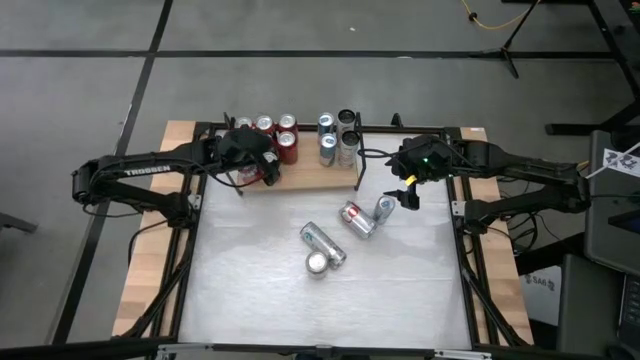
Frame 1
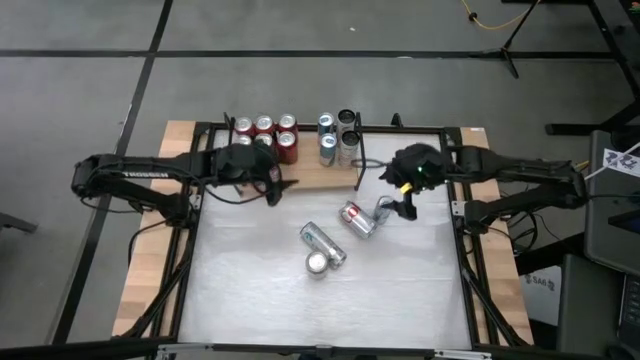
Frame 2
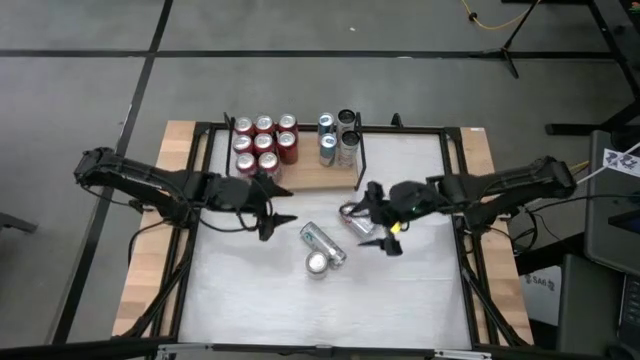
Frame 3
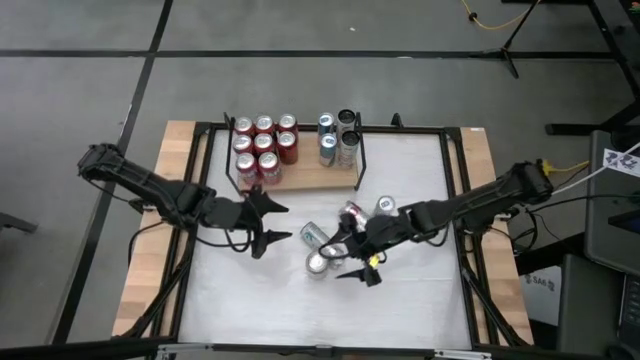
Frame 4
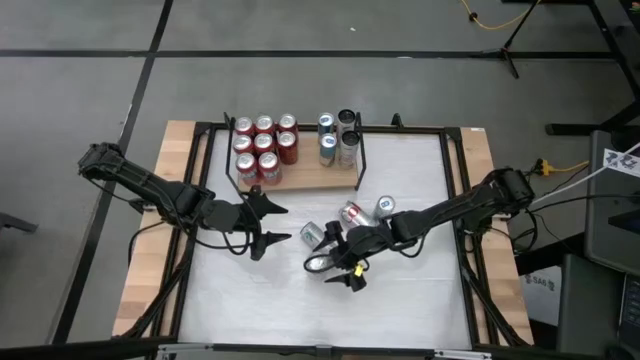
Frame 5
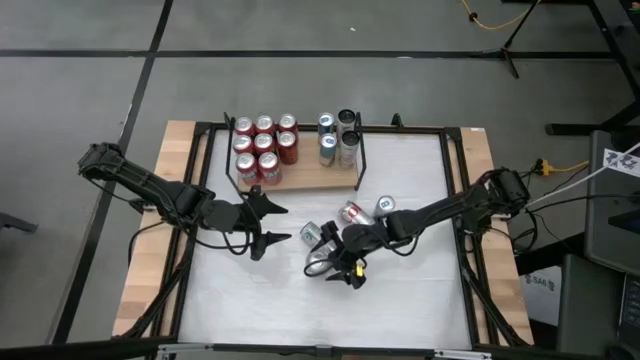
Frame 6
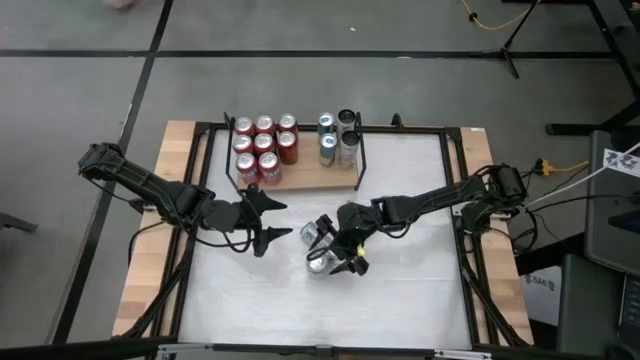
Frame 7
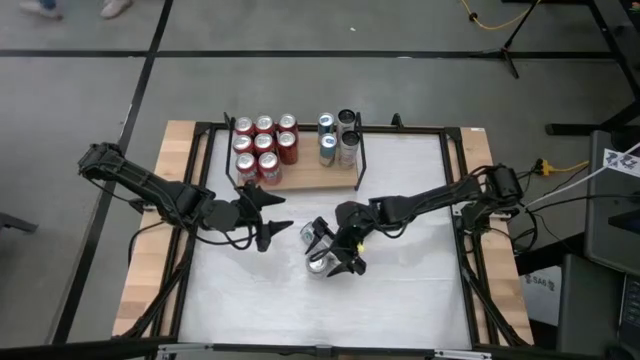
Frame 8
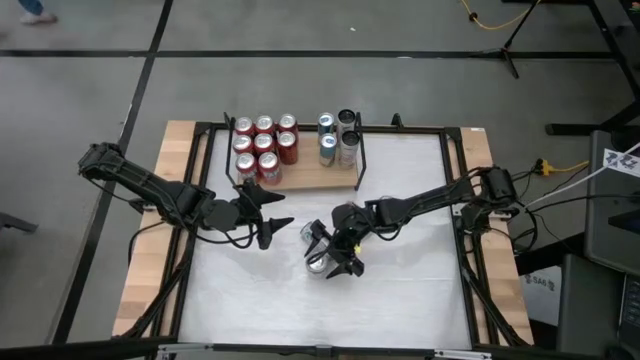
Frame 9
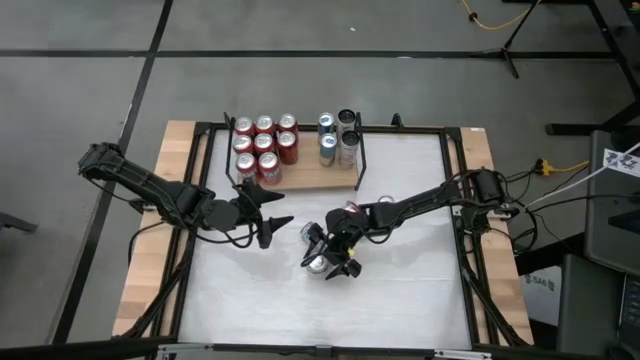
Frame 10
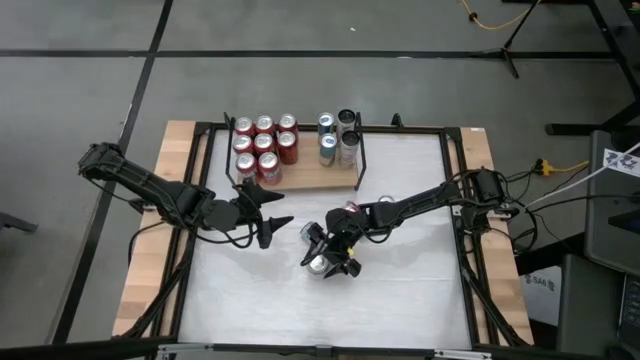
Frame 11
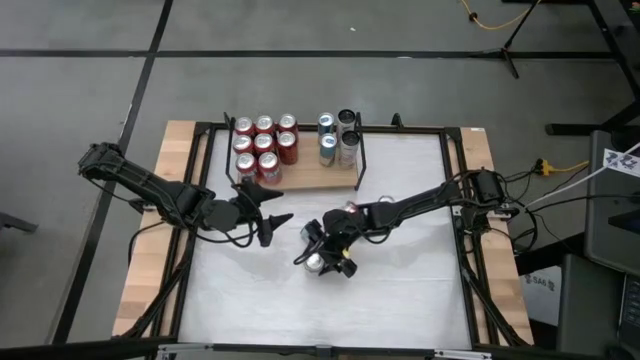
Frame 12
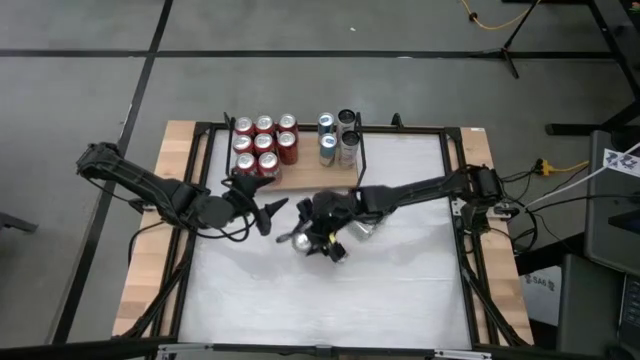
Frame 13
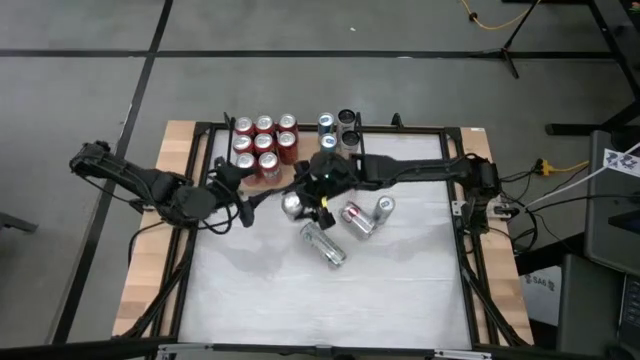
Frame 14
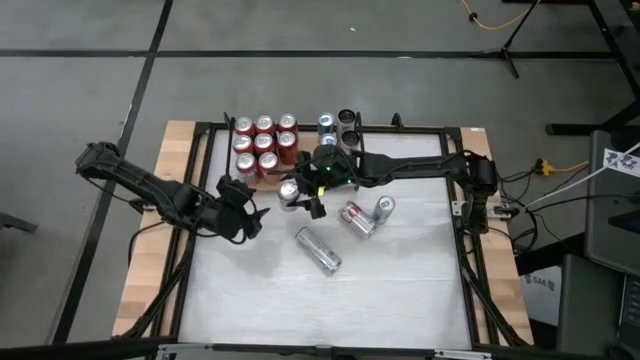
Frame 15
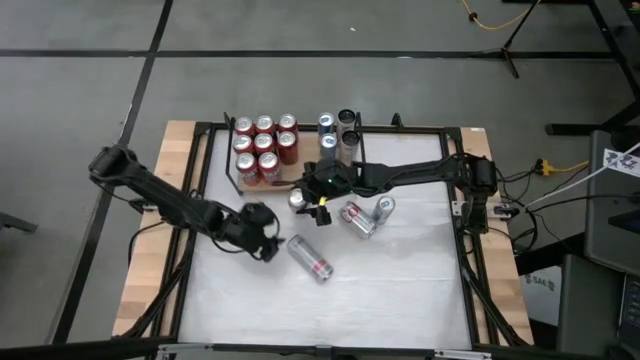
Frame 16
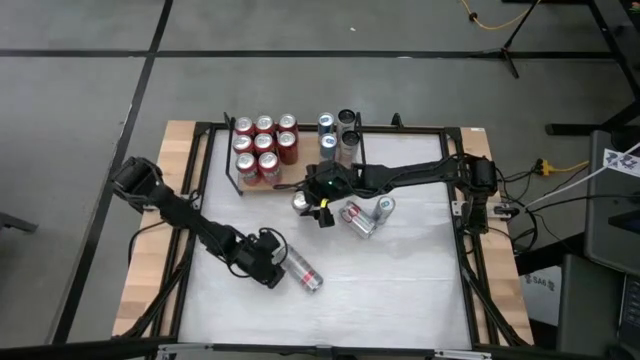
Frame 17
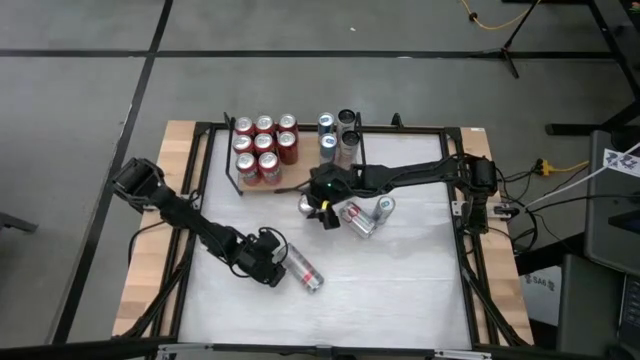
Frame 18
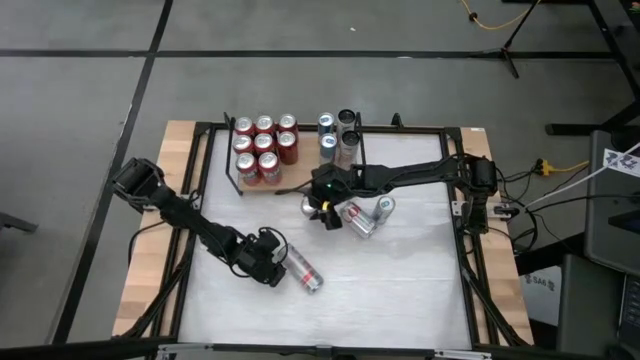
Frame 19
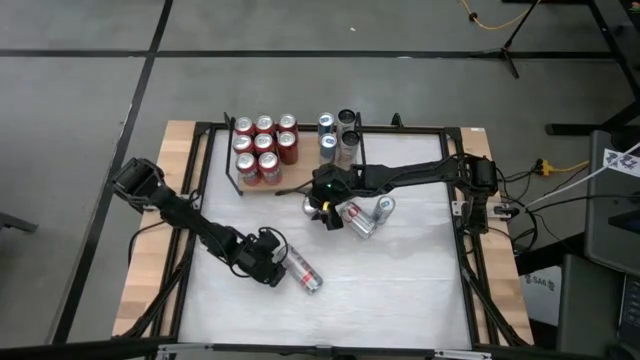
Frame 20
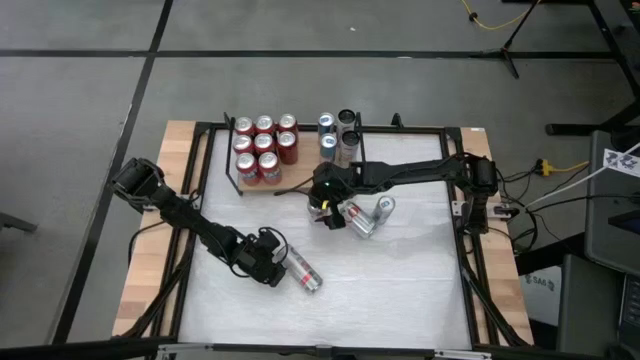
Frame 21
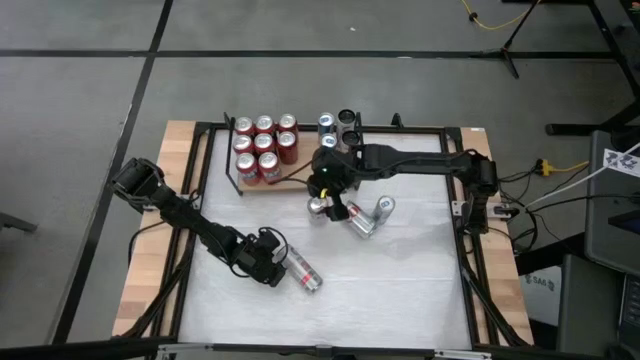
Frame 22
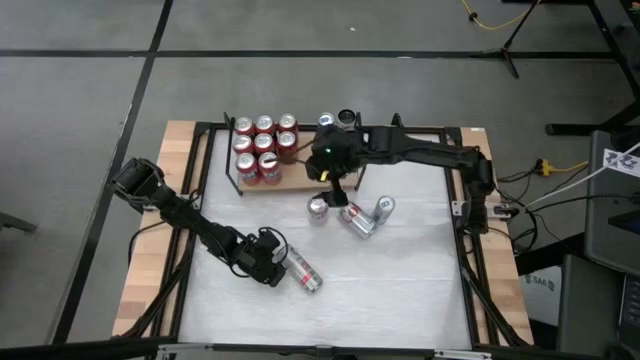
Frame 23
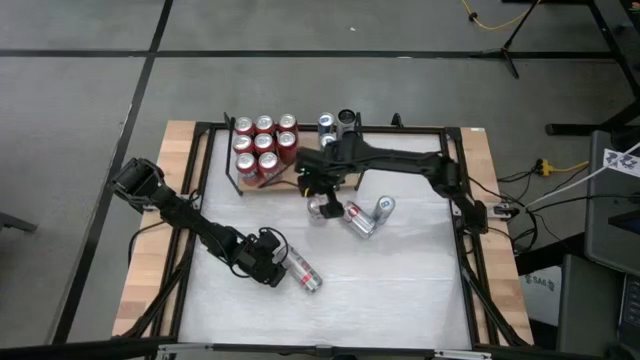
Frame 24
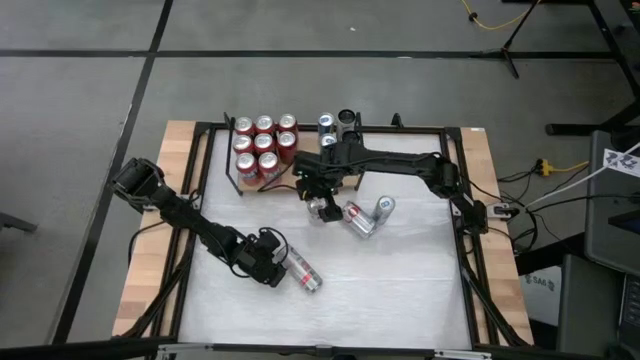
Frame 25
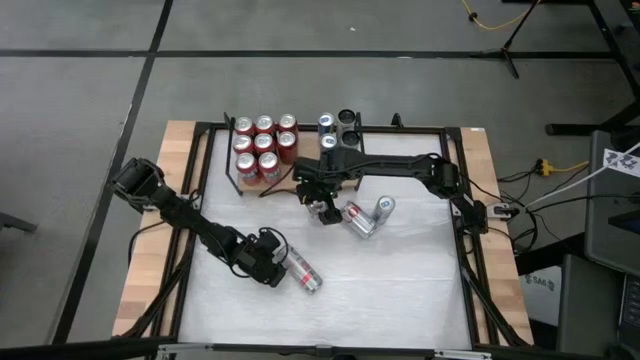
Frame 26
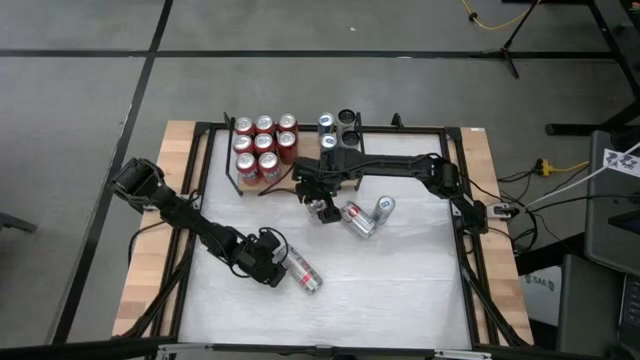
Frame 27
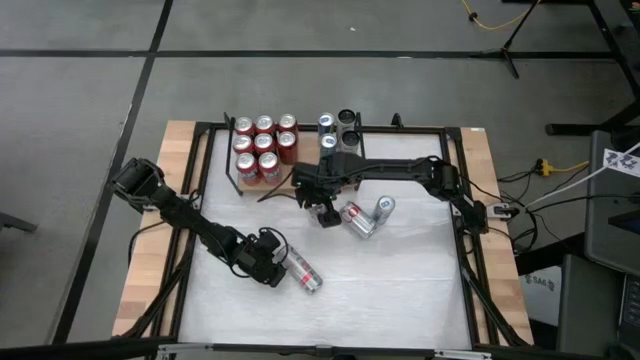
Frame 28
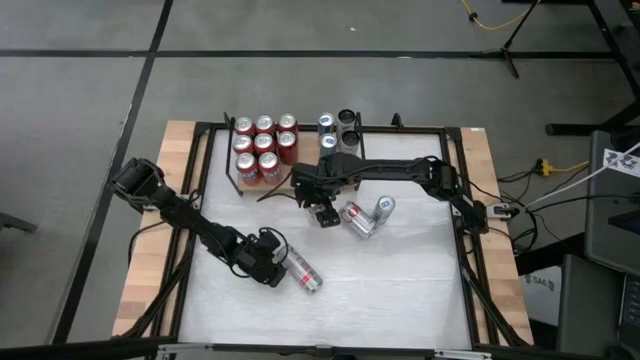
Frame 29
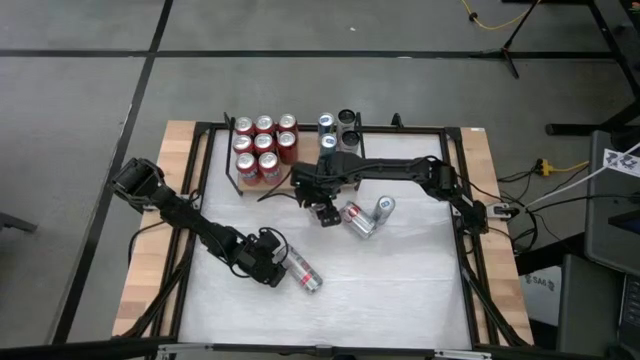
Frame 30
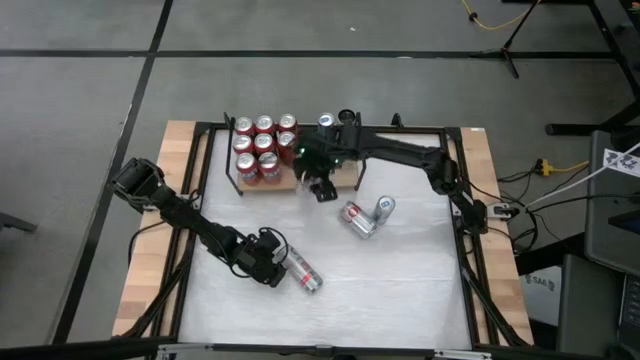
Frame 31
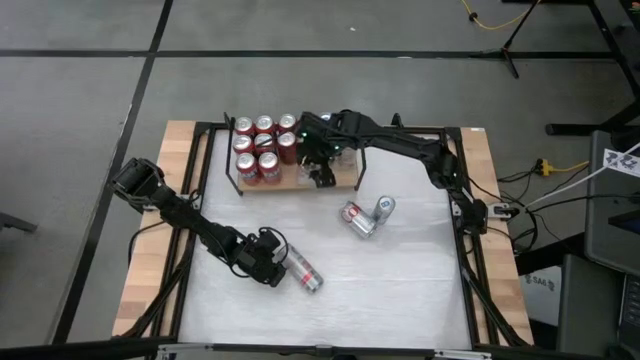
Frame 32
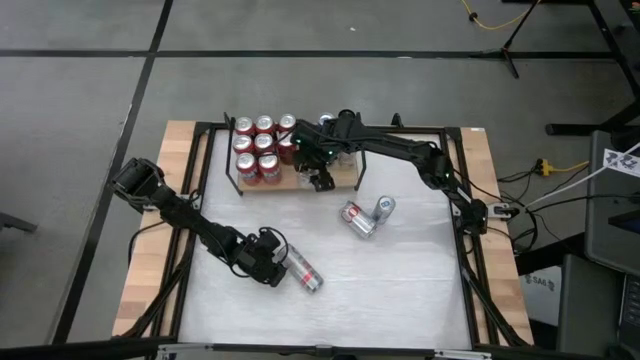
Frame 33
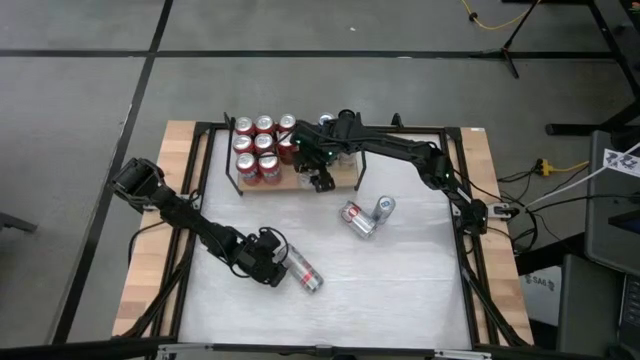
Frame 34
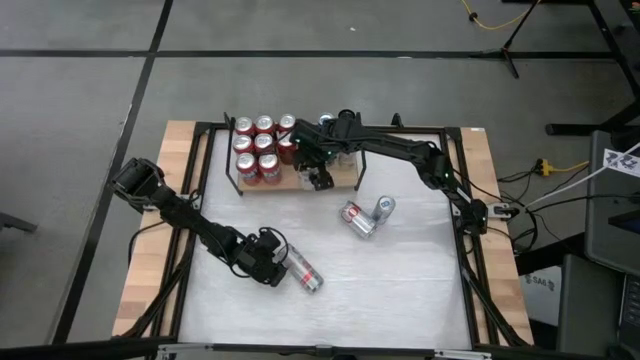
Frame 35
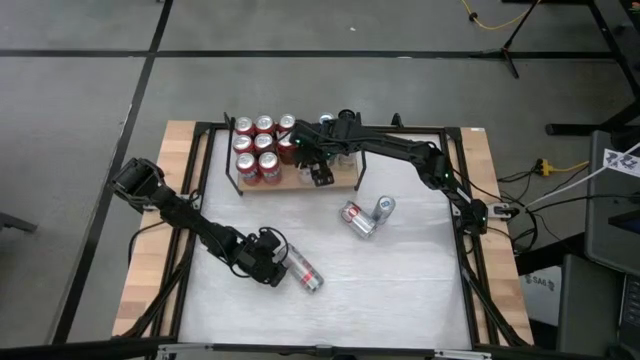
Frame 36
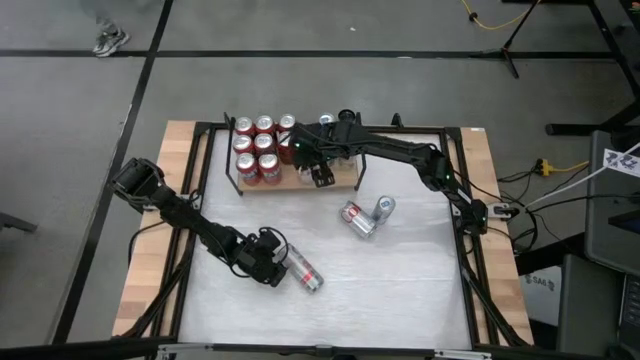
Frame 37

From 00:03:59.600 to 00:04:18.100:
Task: Place canned beverage on shelf
Put the red silver soda can on the shelf

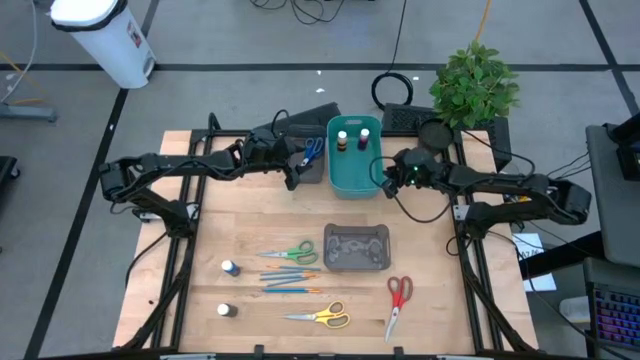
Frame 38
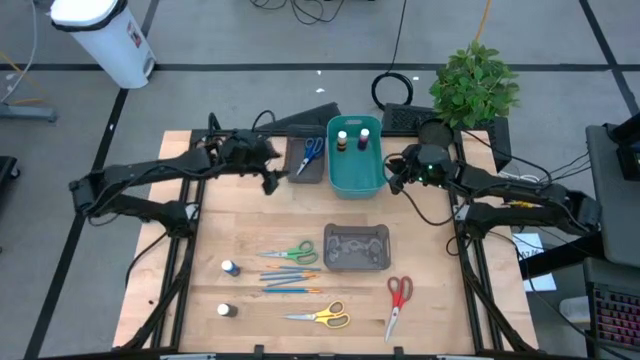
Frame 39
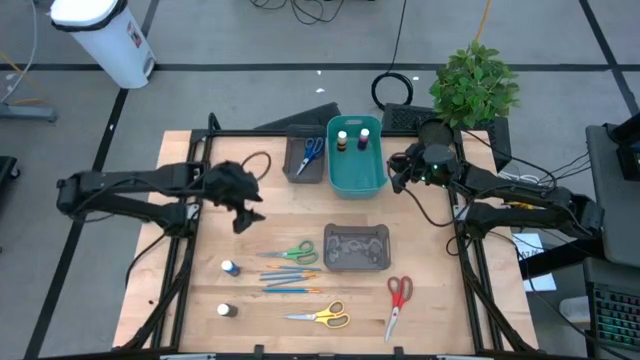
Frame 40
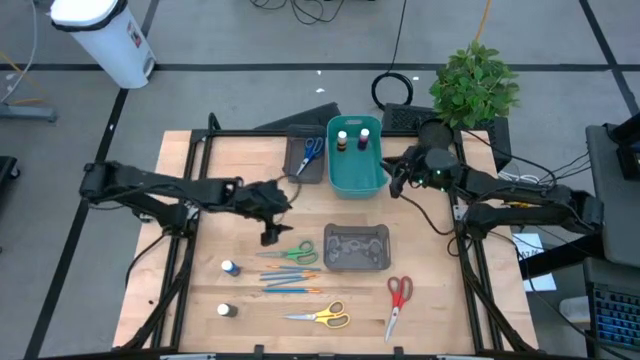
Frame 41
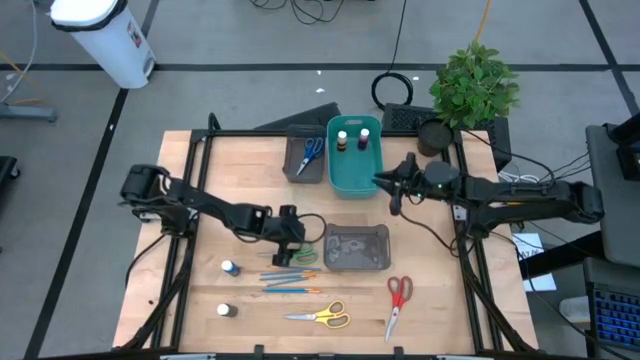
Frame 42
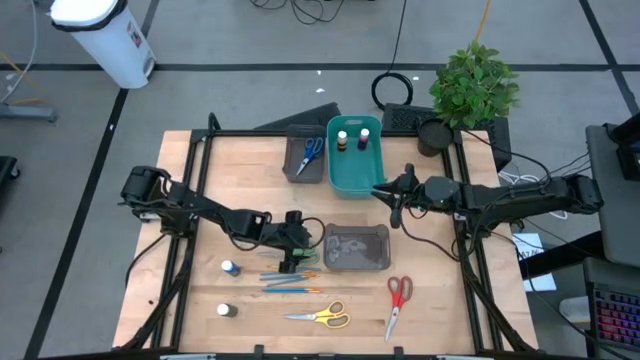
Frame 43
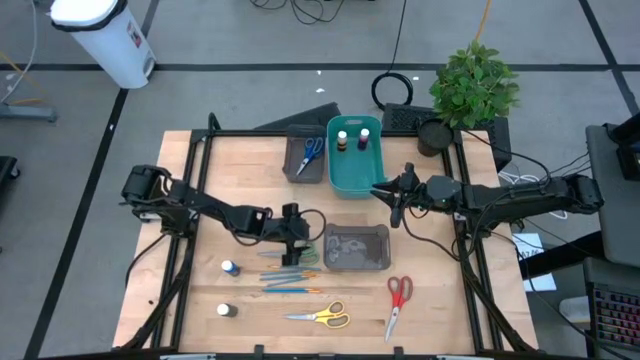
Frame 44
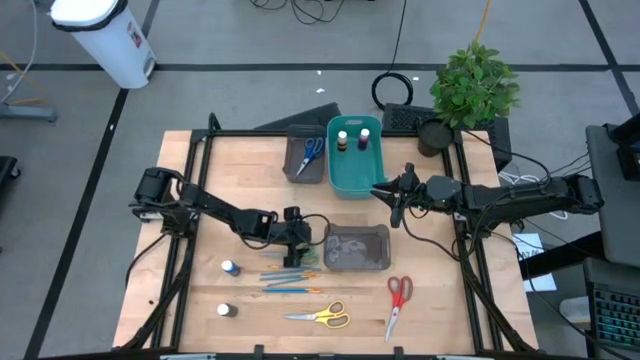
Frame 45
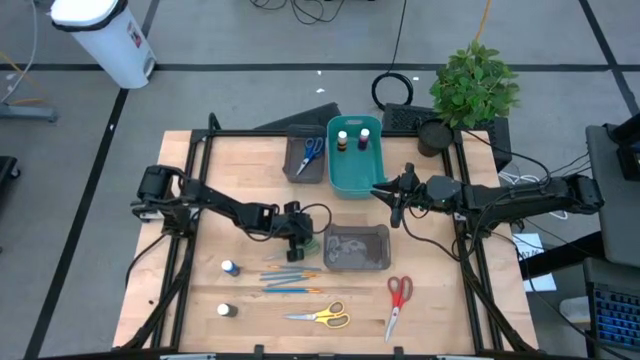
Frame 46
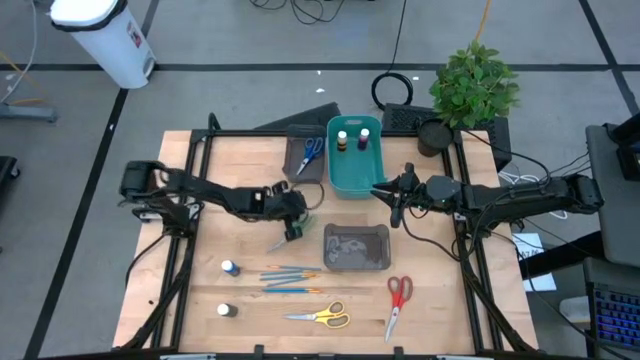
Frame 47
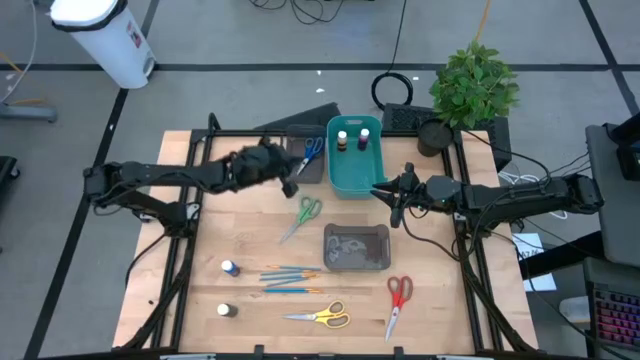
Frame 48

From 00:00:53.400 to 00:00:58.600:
Task: Pick & Place Paint Supplies
Put the green scissors into the top black bin
